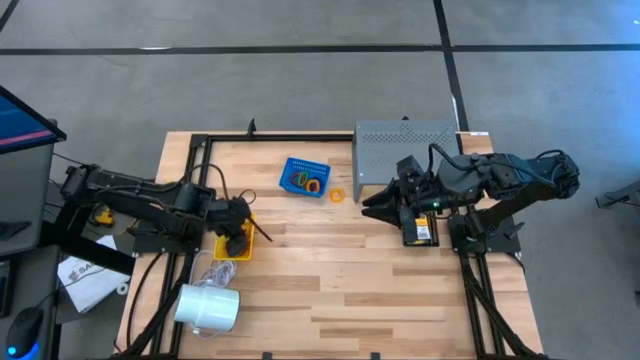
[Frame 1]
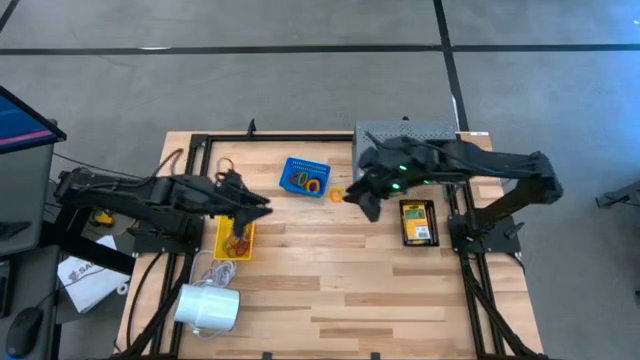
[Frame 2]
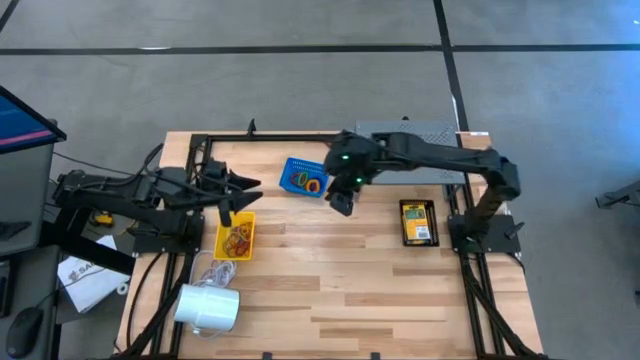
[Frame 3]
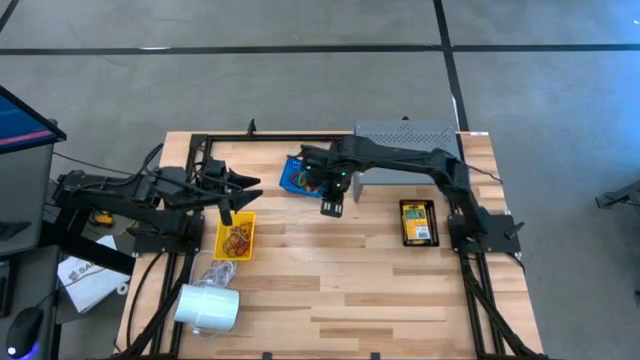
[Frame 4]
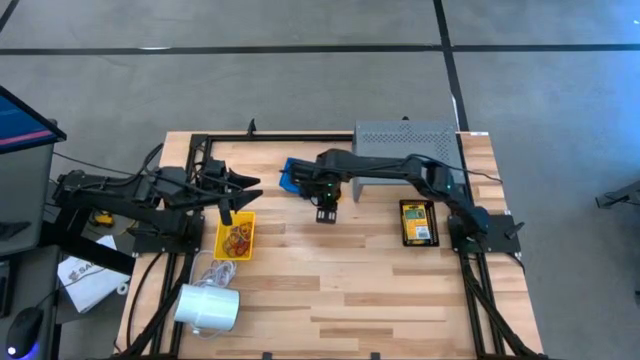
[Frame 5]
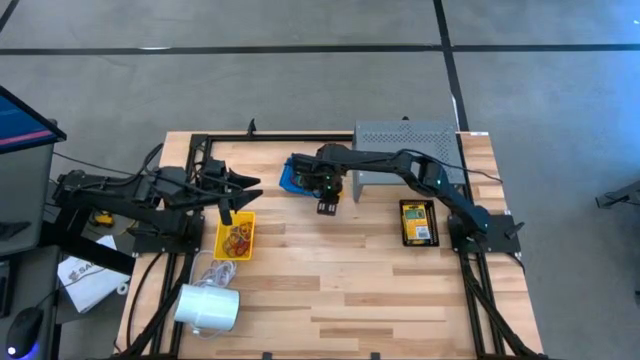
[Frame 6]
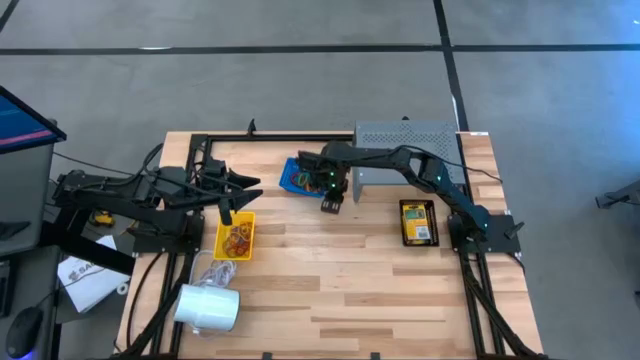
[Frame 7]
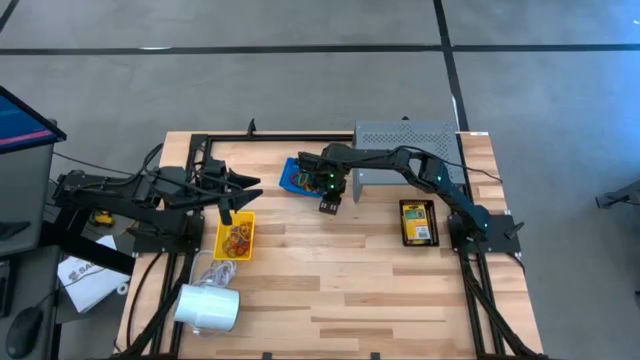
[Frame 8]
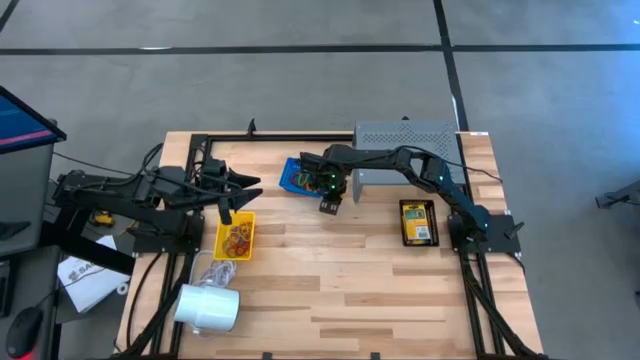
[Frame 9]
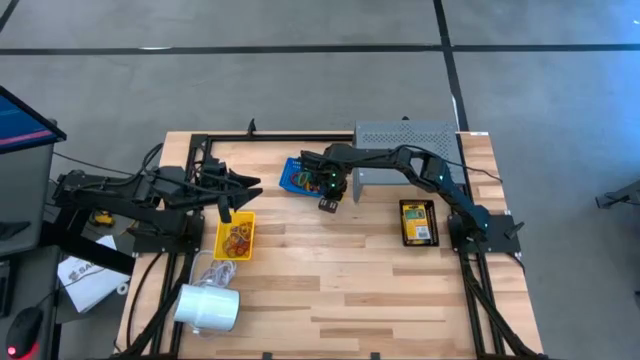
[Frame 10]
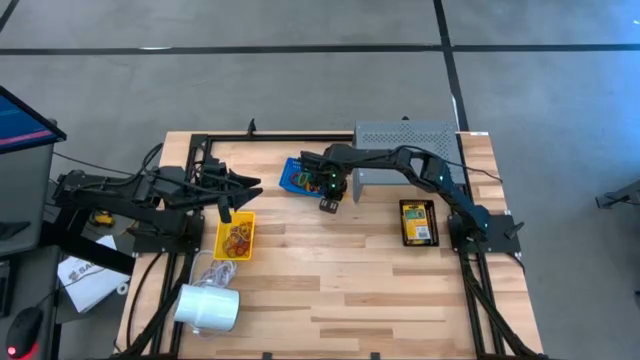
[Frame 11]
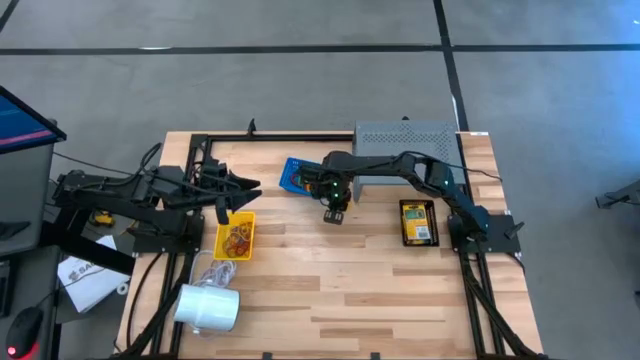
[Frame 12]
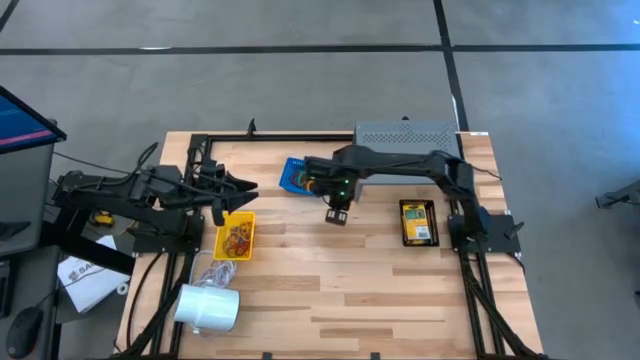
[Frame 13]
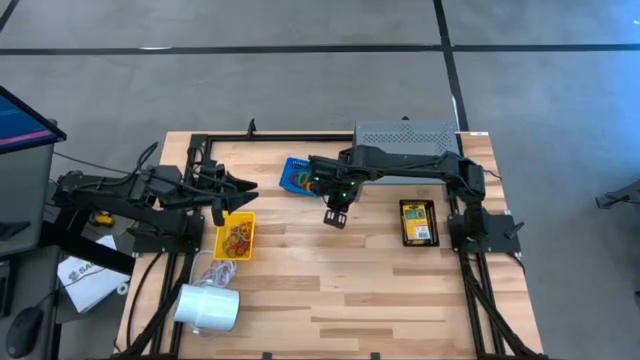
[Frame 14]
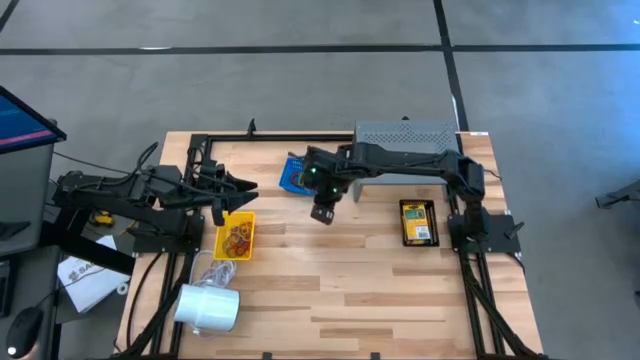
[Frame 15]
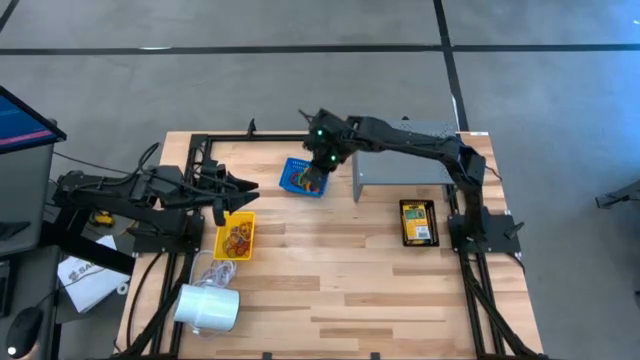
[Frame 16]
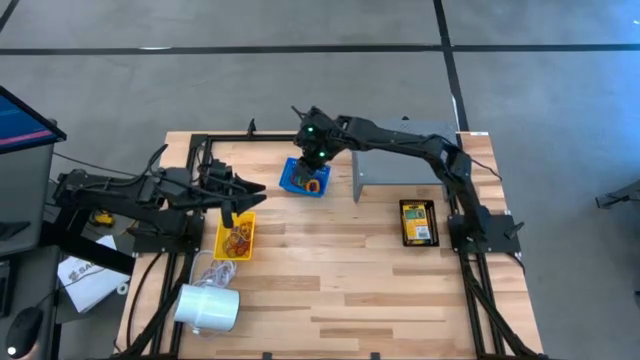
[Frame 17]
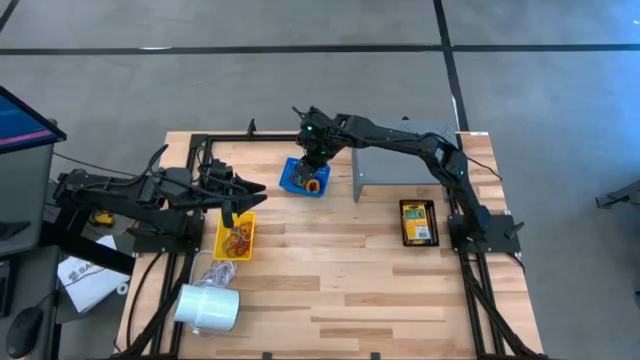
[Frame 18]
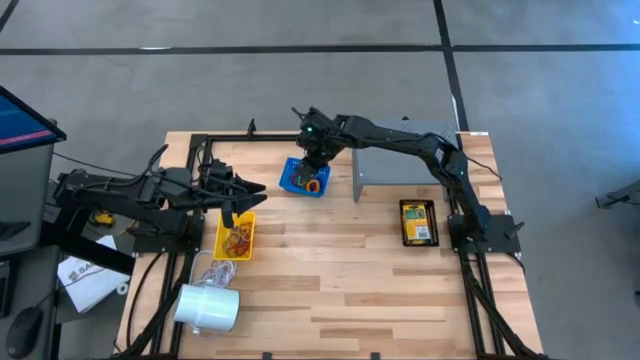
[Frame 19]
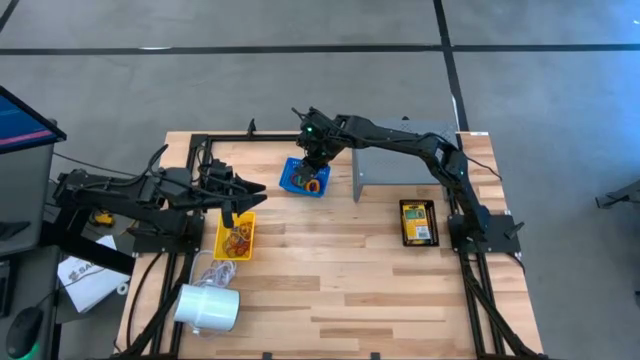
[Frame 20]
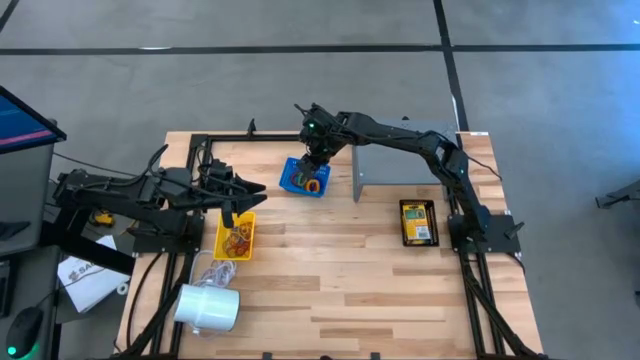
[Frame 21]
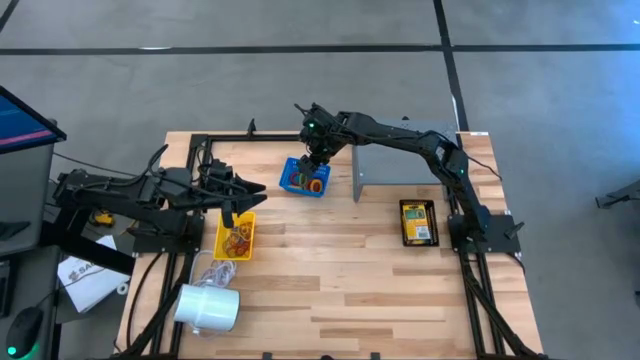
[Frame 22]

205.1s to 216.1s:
Task: Pick & Place Office Desk Supplies
Put the yellow spring keychain into the blue bin

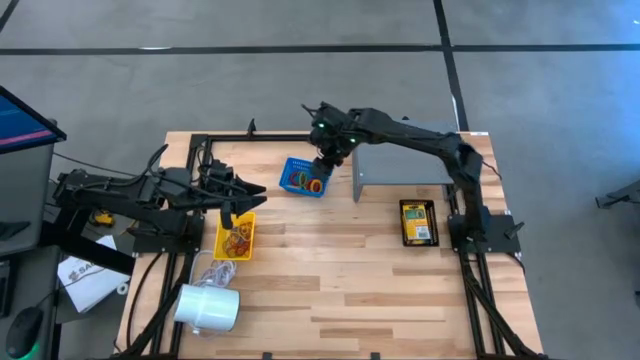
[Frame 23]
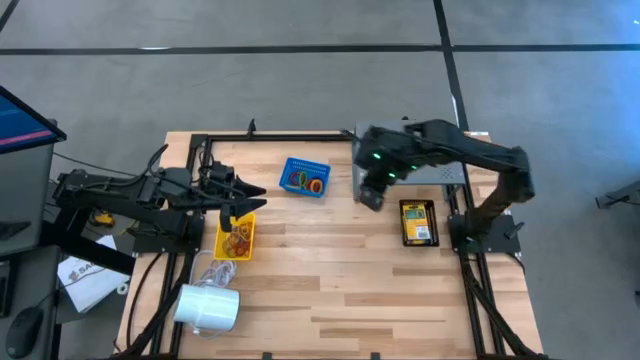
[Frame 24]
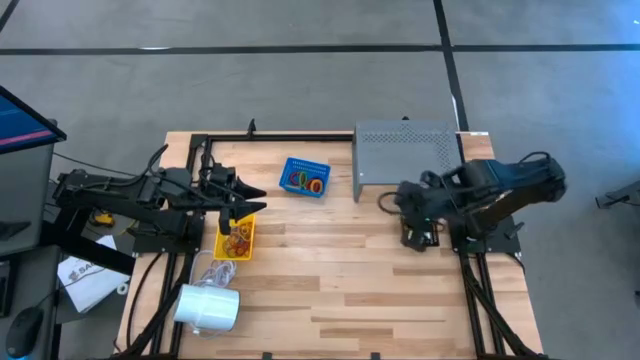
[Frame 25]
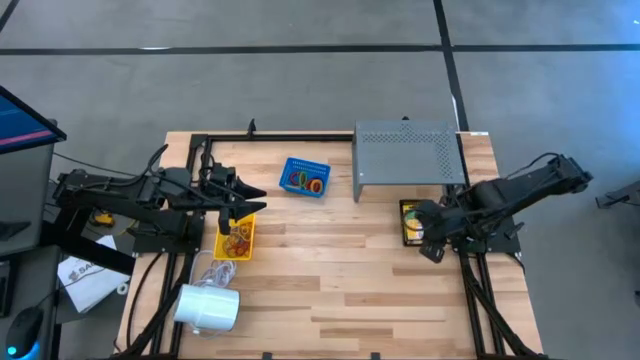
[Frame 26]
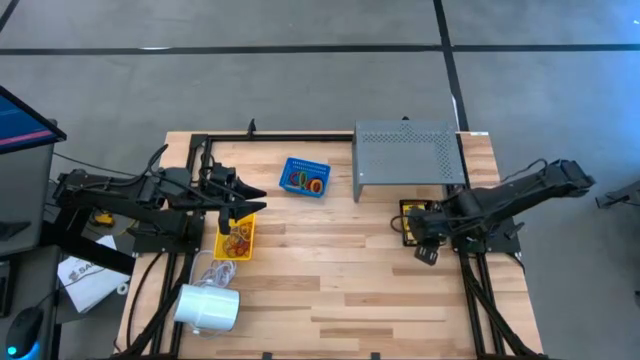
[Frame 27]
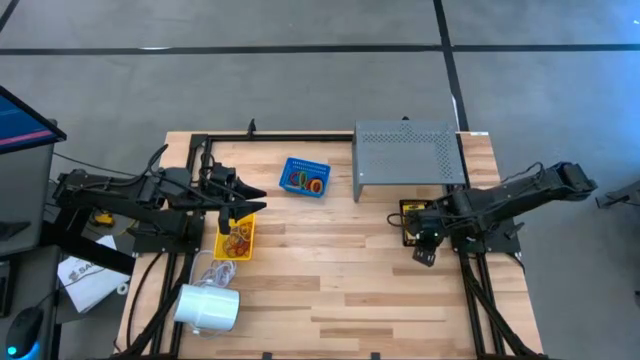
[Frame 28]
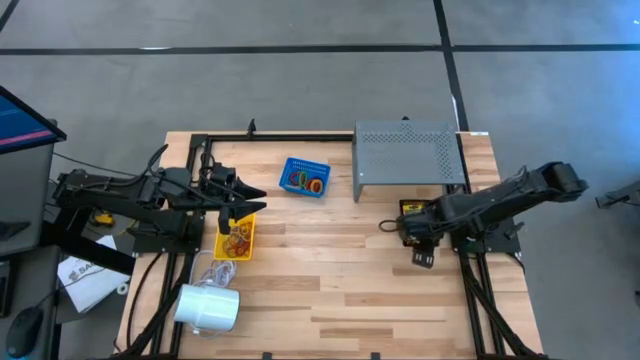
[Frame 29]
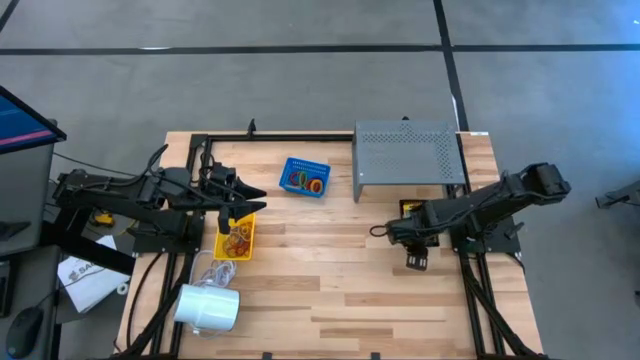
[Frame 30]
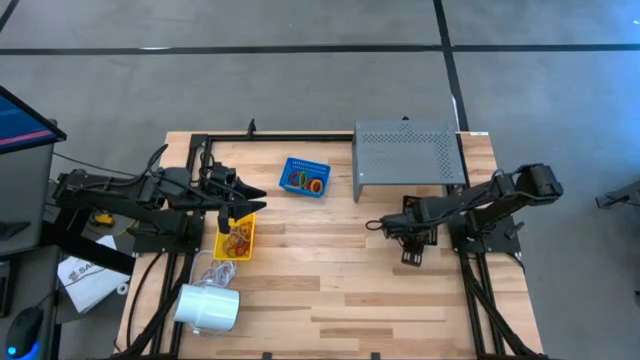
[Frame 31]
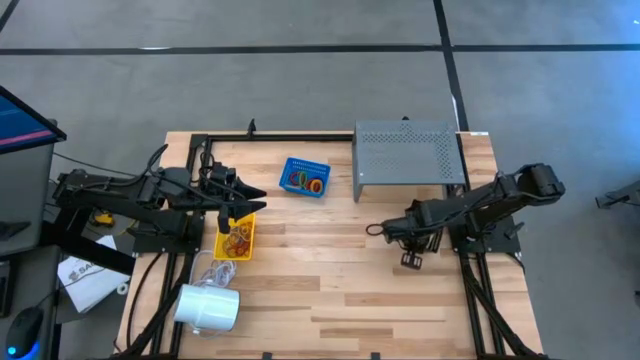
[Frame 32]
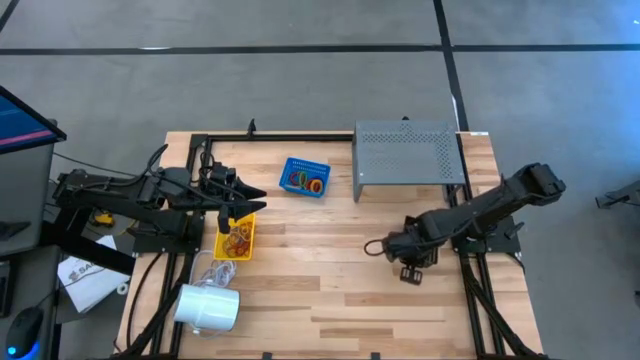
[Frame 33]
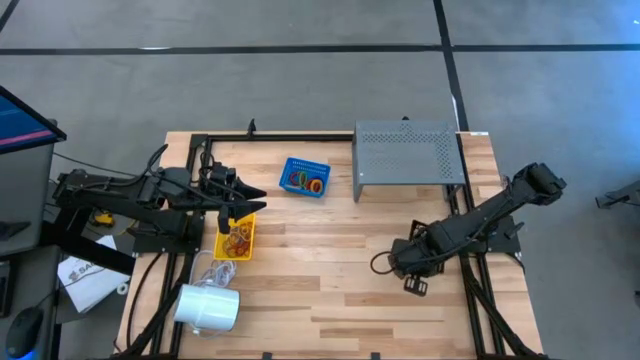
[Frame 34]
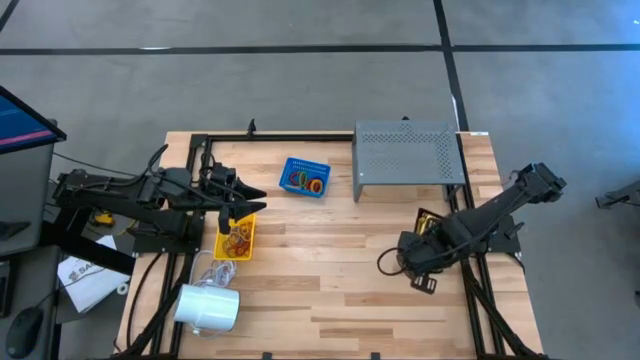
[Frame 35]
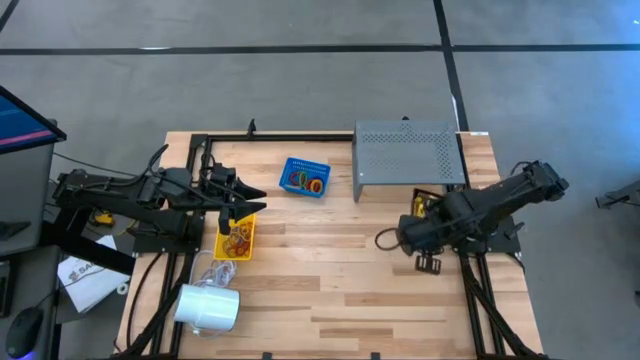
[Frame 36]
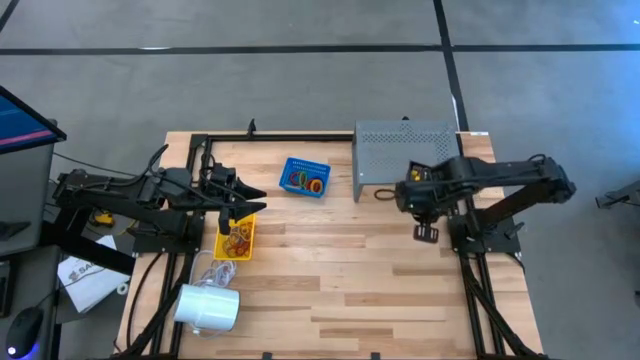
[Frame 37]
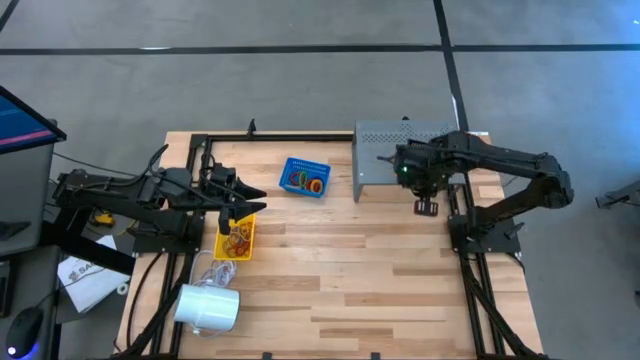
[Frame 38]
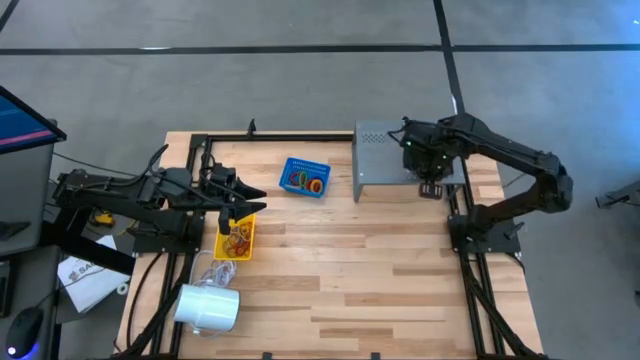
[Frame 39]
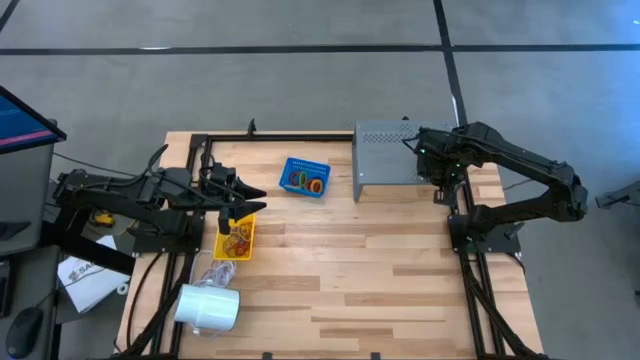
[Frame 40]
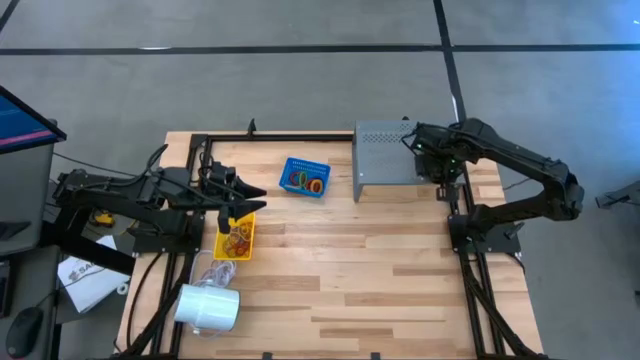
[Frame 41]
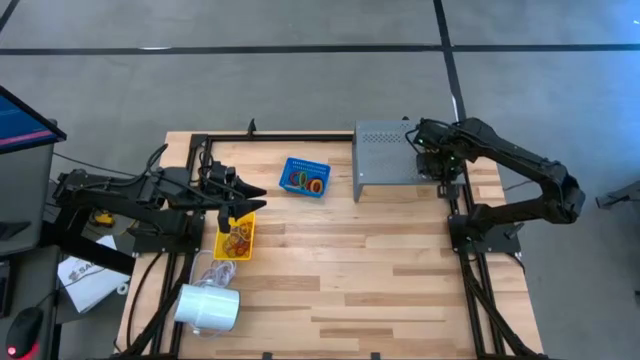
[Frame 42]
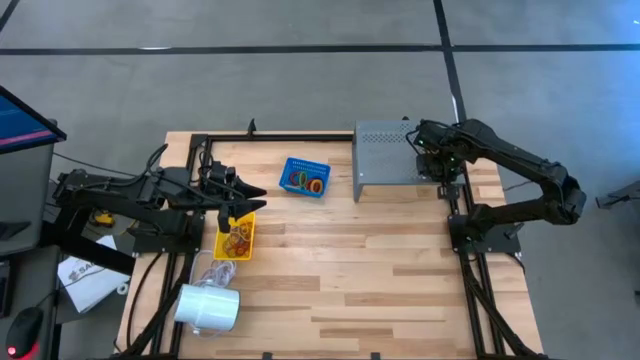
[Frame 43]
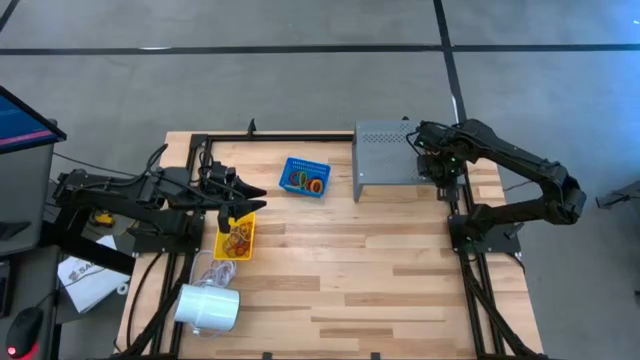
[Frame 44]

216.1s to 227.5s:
Put the black bin with the yellow crayon boxes on the shelf
